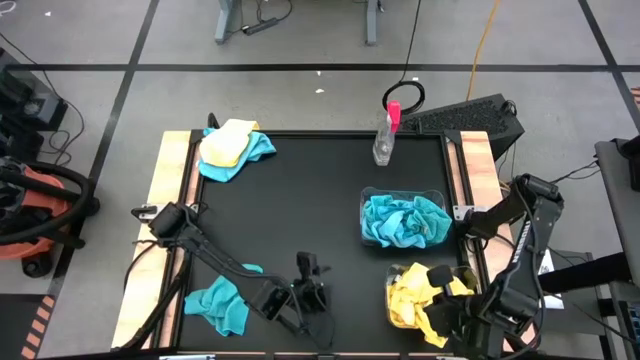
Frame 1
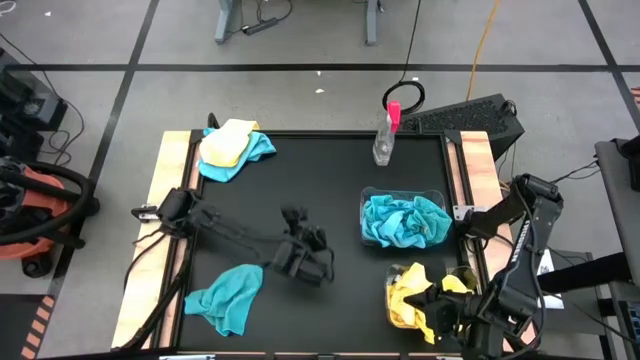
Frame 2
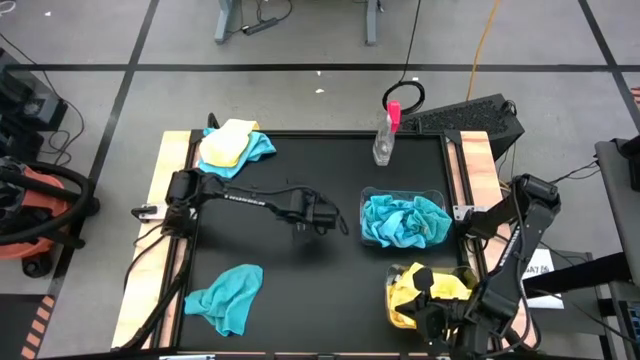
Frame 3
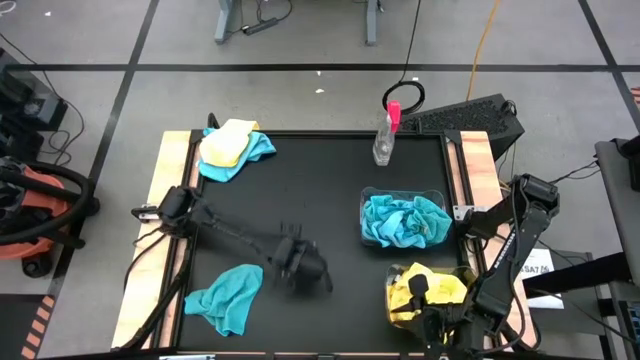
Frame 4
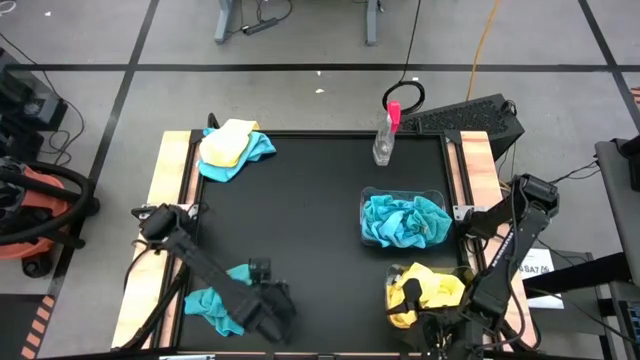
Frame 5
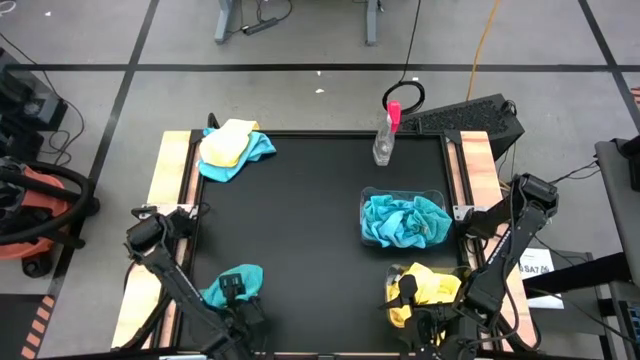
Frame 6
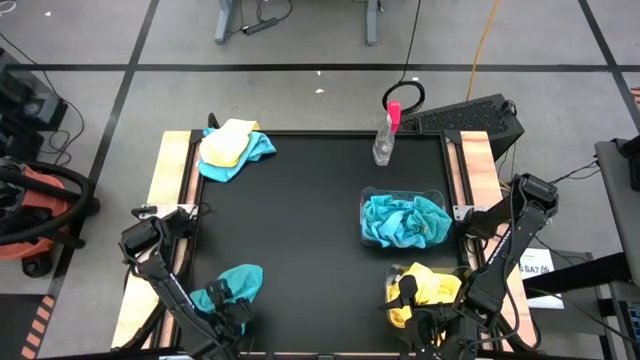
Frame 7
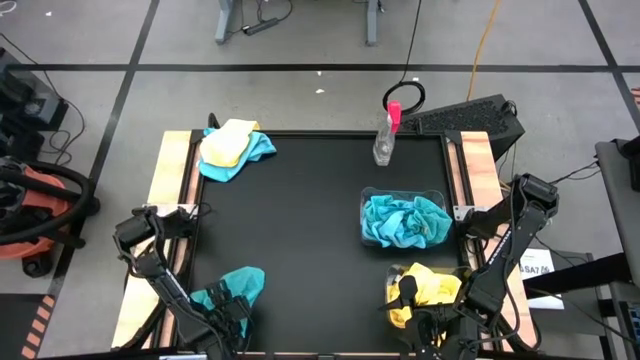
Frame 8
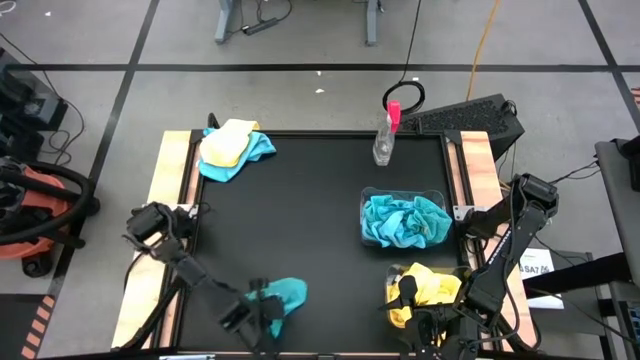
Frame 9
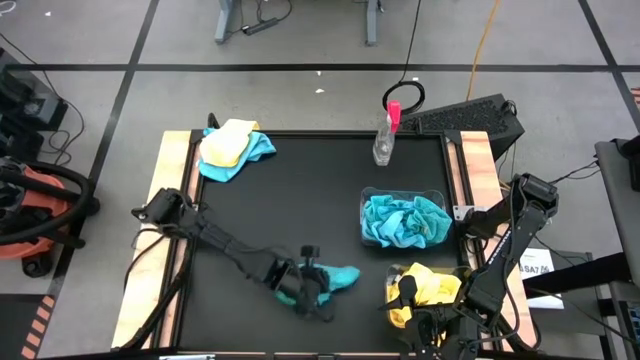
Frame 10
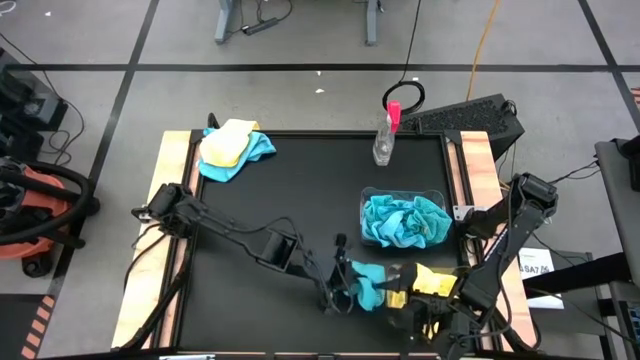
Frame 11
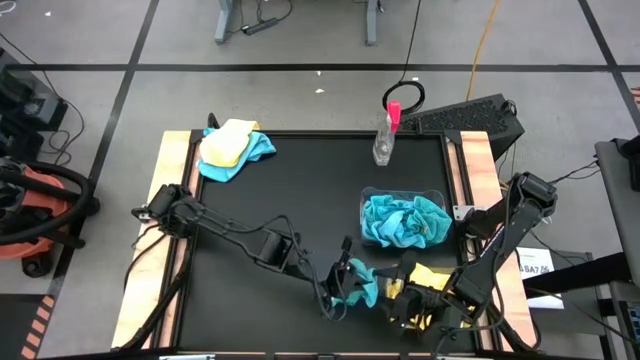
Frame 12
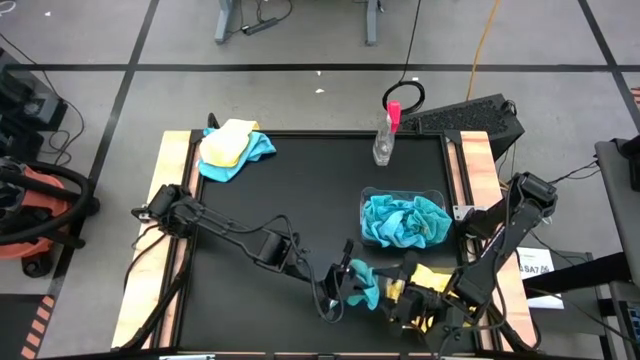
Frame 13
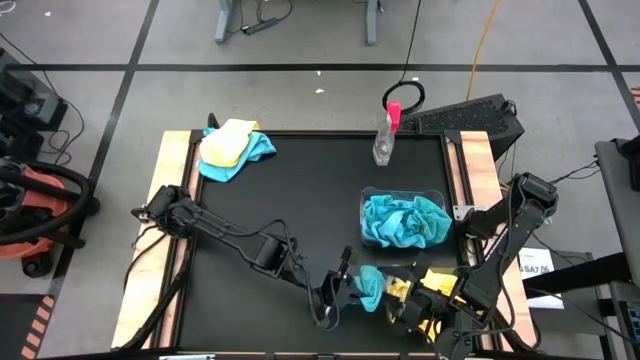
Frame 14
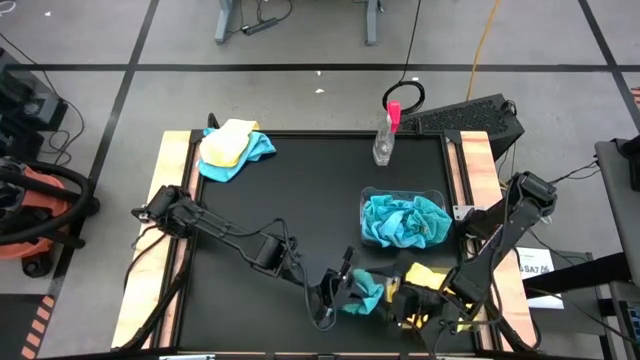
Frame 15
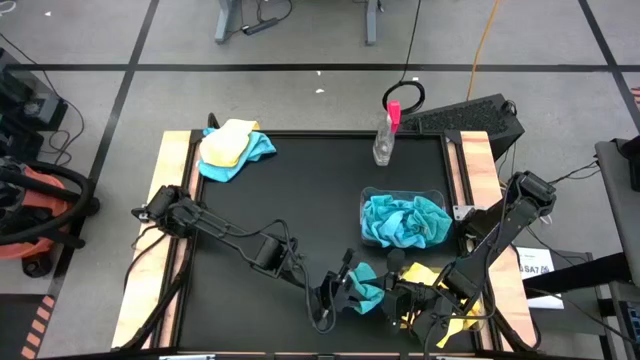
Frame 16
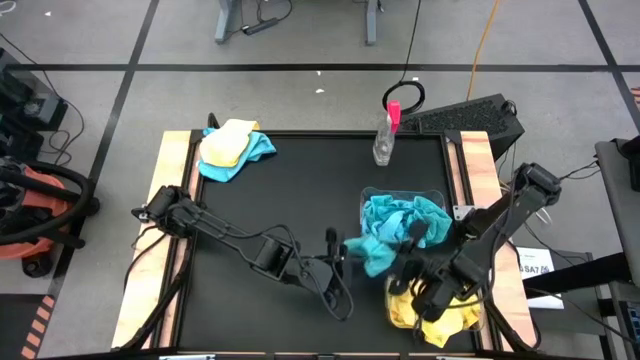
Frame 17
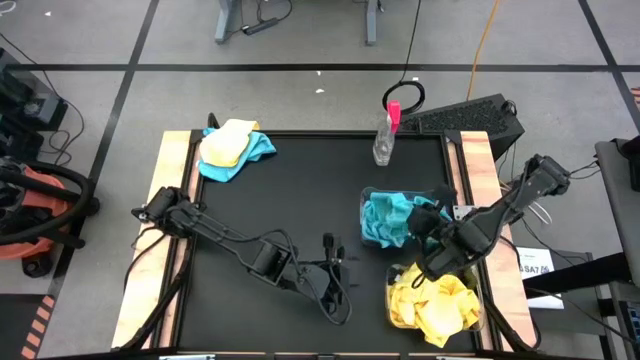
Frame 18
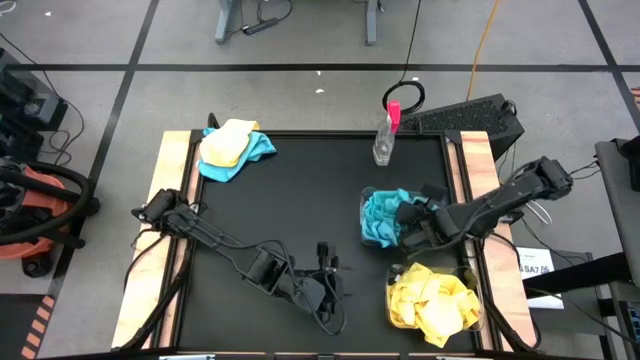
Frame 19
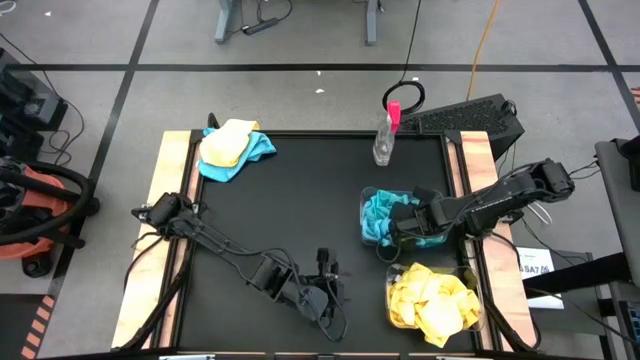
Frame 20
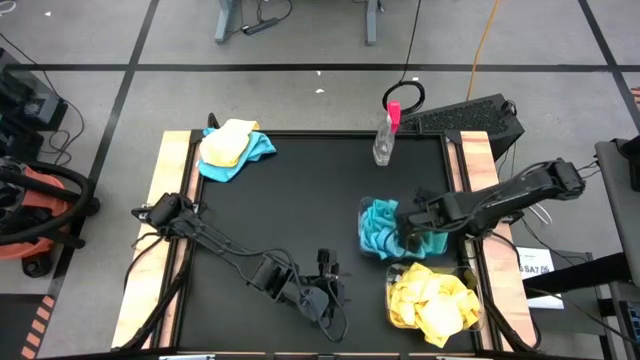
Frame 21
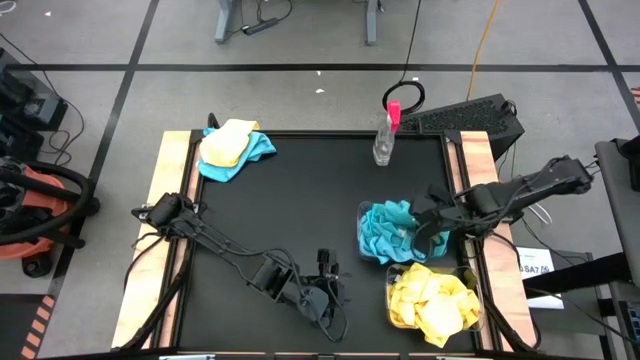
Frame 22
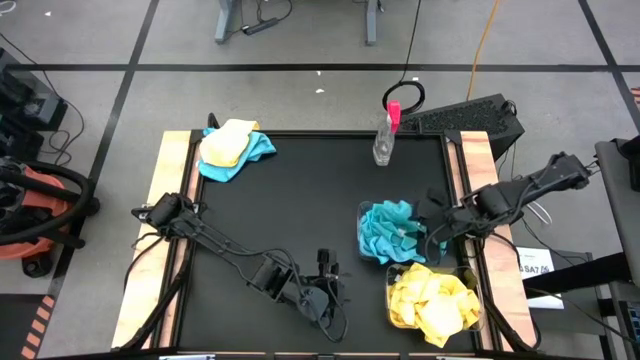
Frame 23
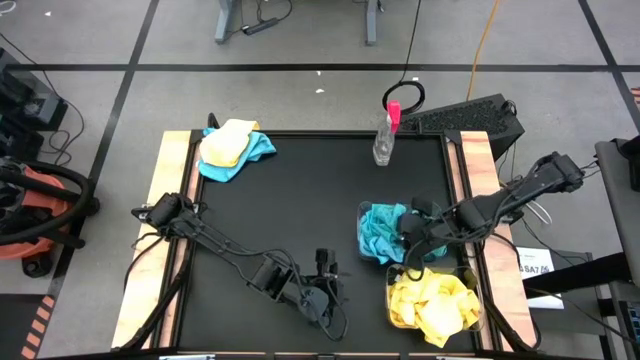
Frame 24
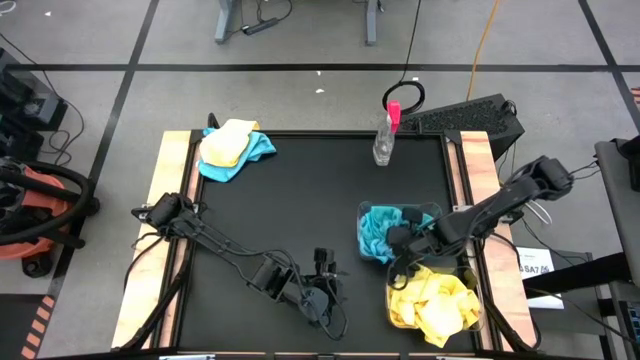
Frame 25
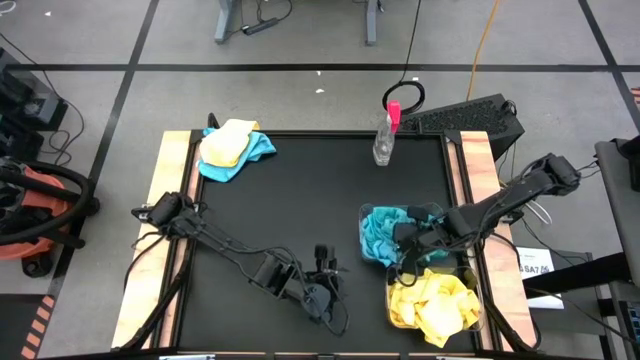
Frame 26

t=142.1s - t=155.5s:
Task: Sort microfiber towel by color & place in baskets
Put the blue towel into the top transparent bin

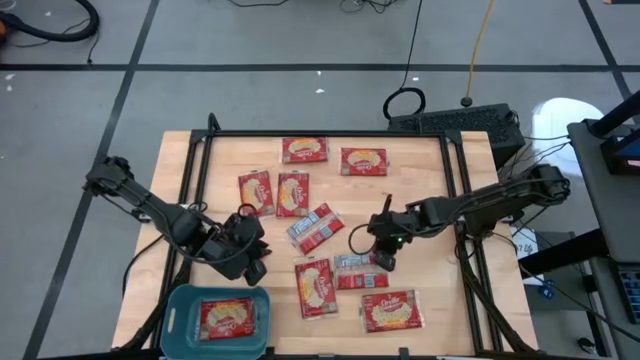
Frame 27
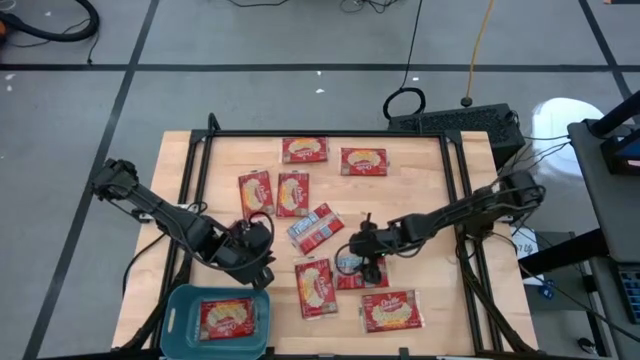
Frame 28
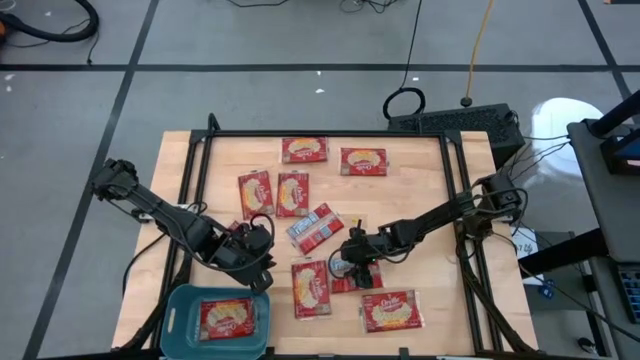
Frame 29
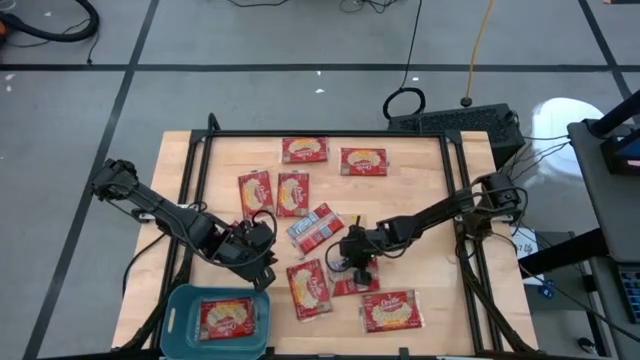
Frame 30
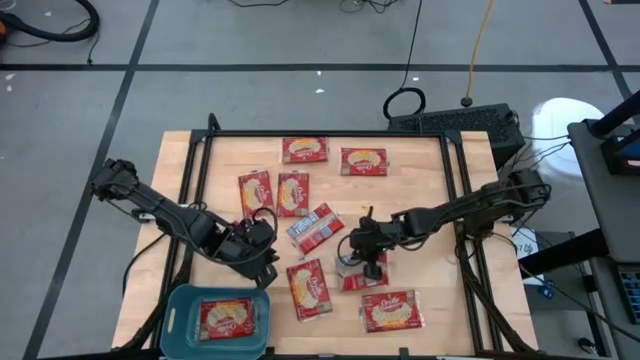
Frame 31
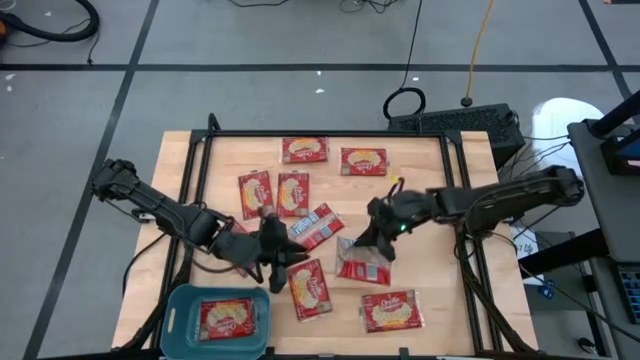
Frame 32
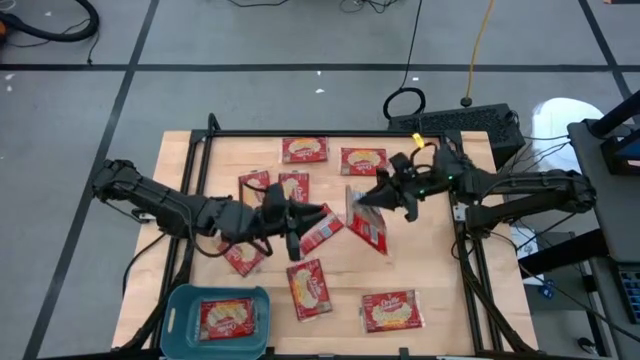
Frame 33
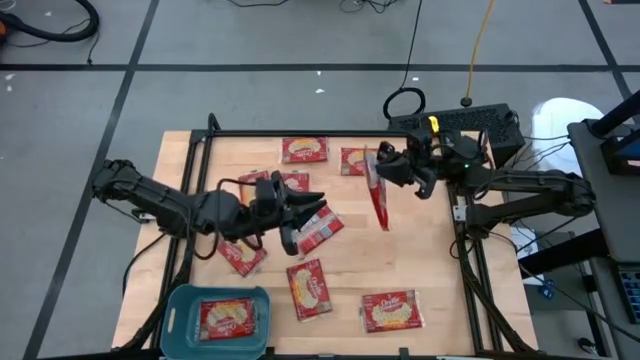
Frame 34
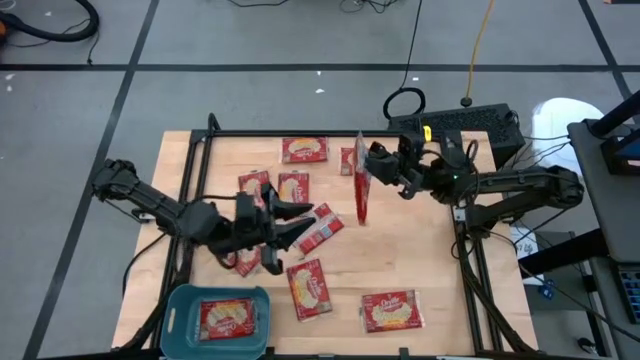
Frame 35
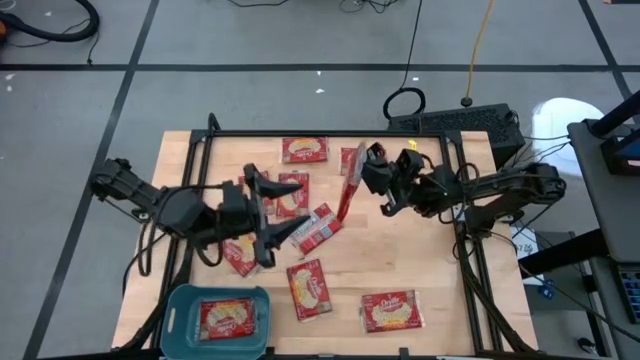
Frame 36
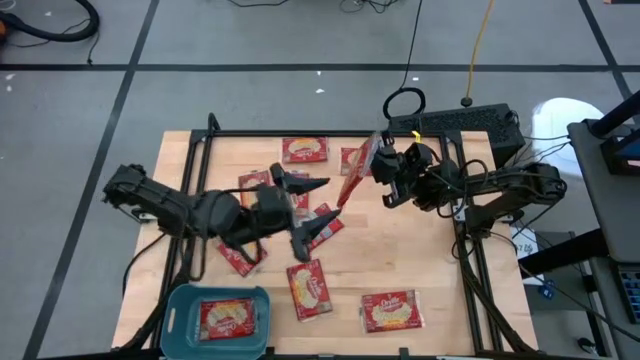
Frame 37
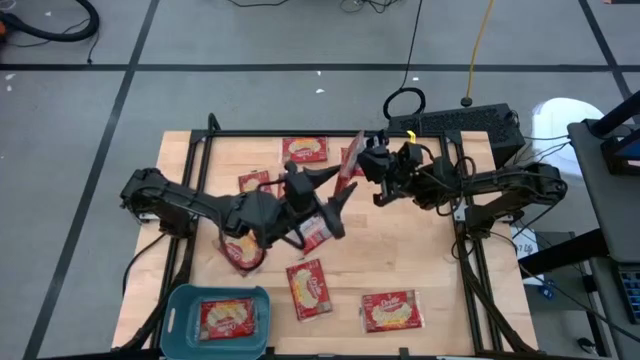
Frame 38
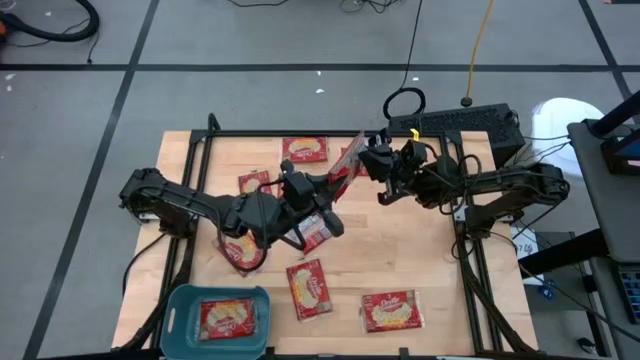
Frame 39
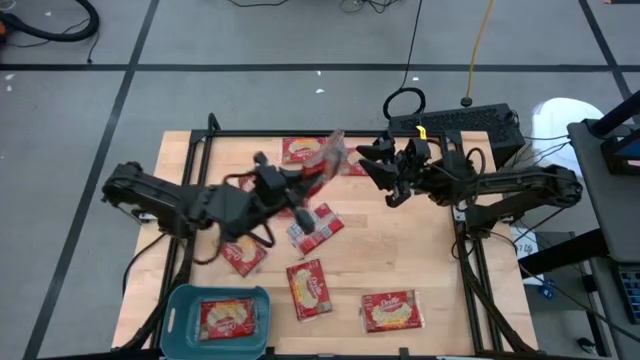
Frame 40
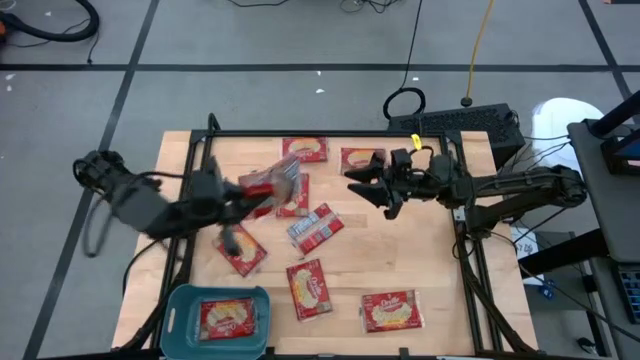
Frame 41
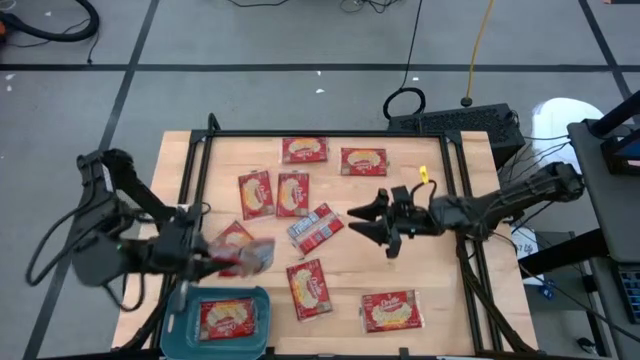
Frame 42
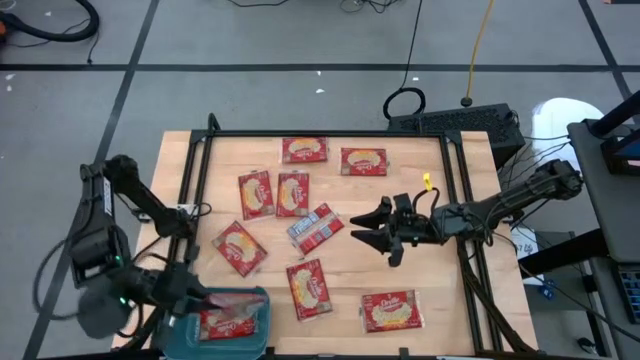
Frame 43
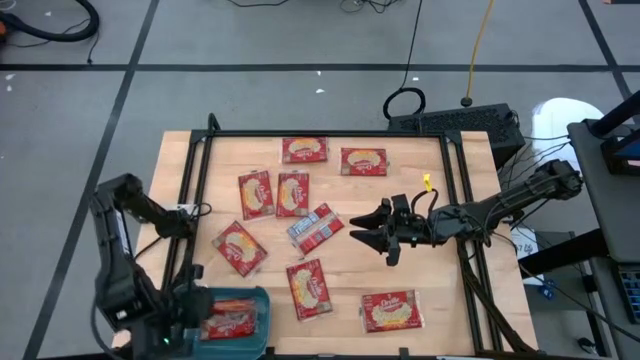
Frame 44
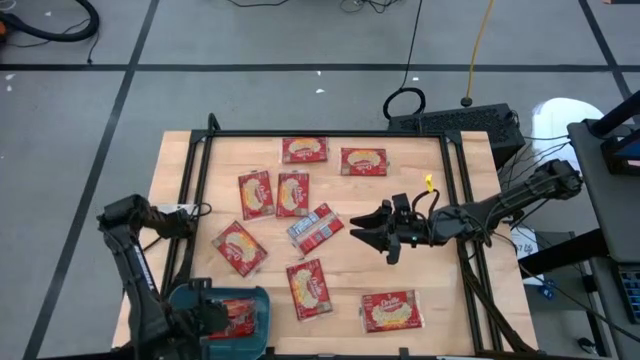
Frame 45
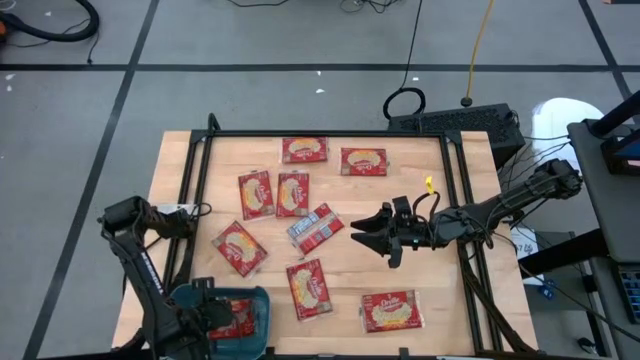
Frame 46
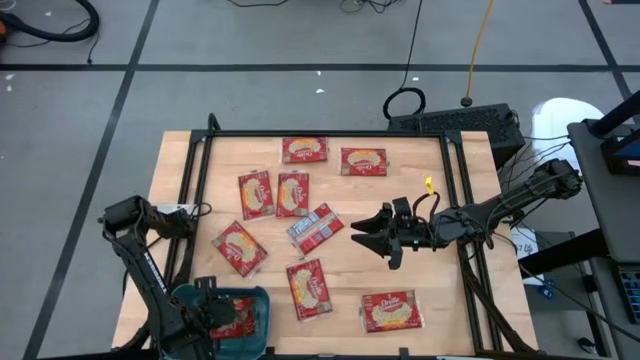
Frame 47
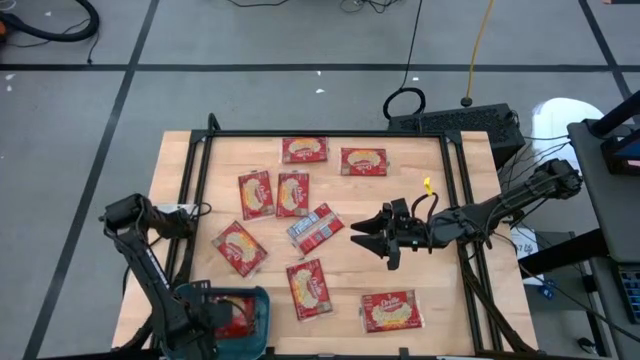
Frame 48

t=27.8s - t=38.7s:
Task: Sort popcorn bags into baskets
Put the popcorn sachet into the bin
